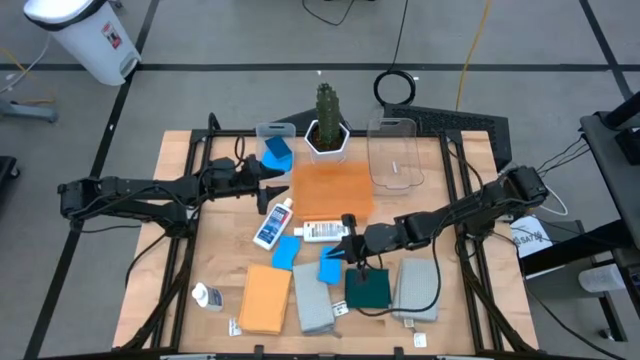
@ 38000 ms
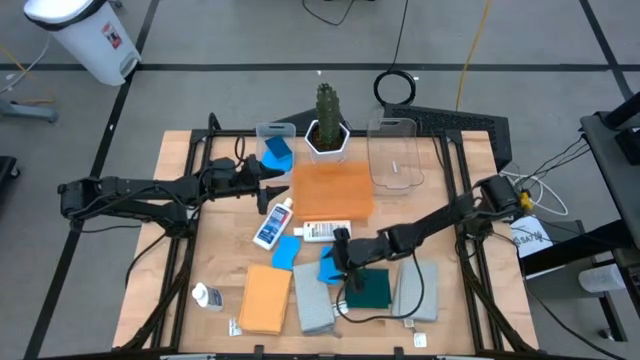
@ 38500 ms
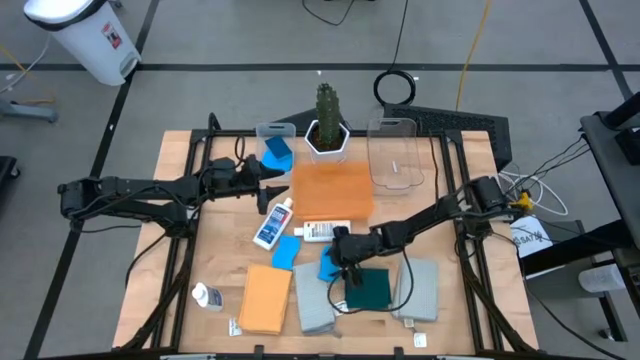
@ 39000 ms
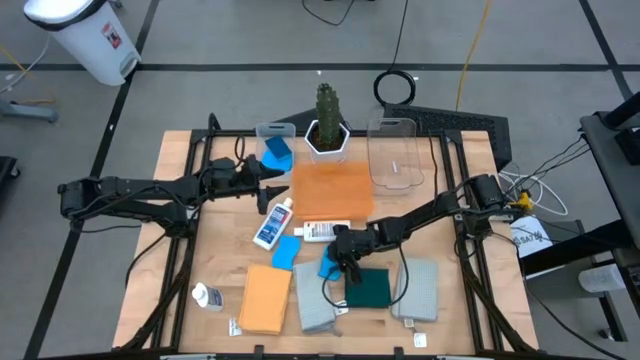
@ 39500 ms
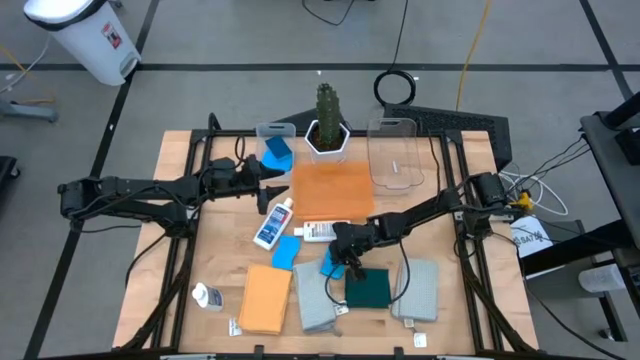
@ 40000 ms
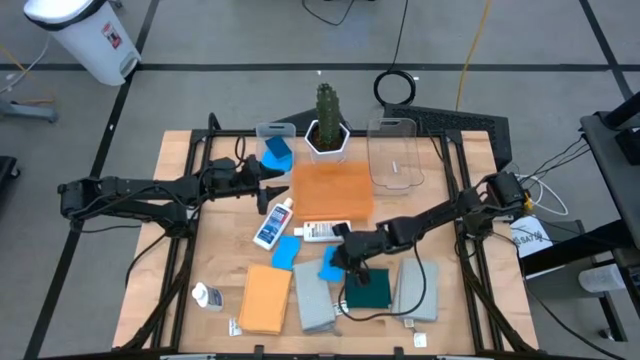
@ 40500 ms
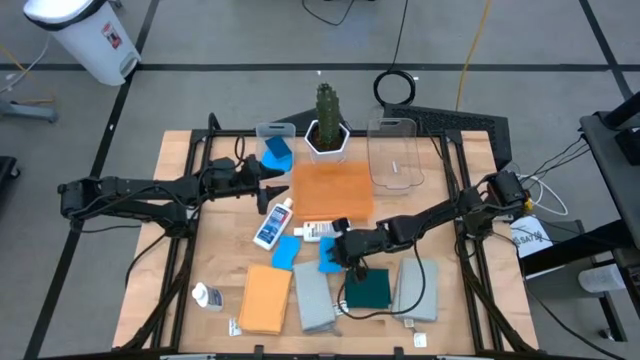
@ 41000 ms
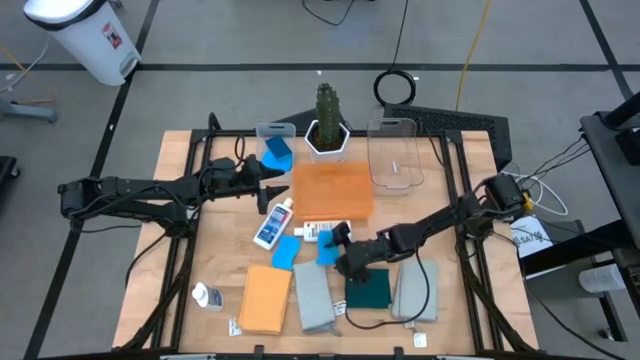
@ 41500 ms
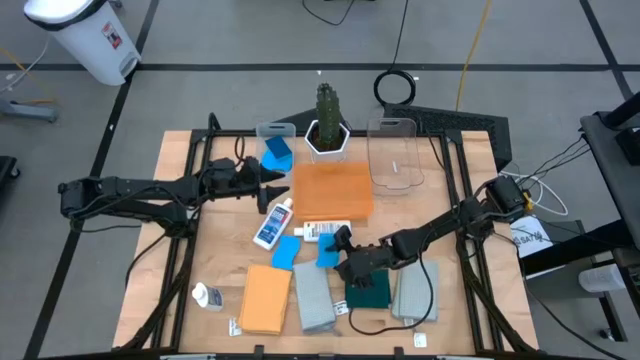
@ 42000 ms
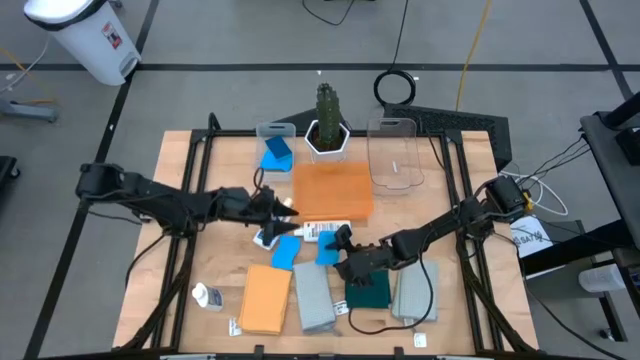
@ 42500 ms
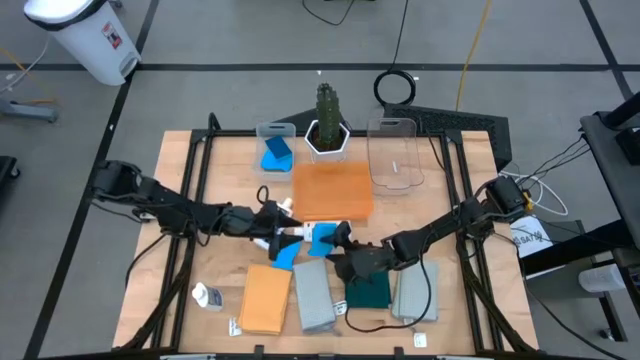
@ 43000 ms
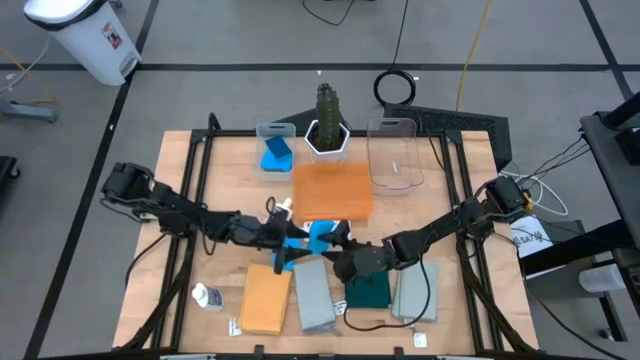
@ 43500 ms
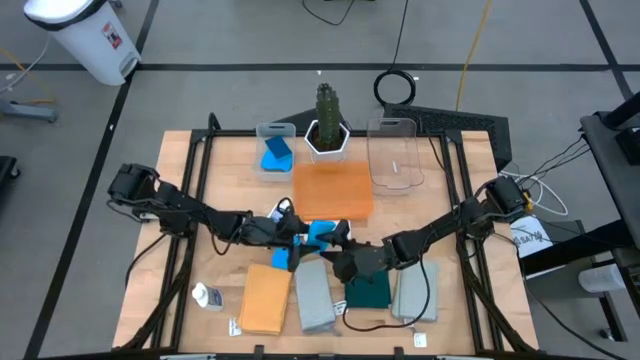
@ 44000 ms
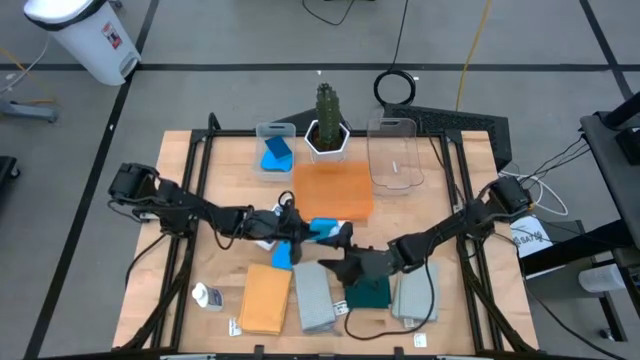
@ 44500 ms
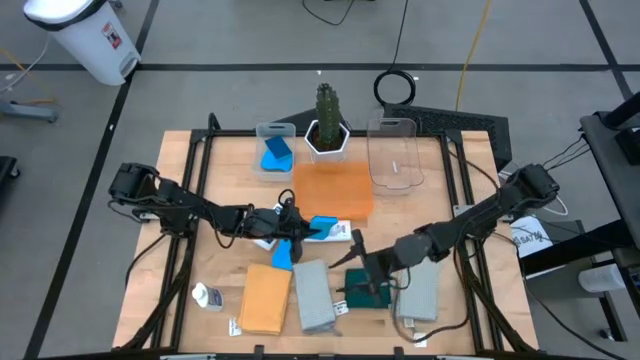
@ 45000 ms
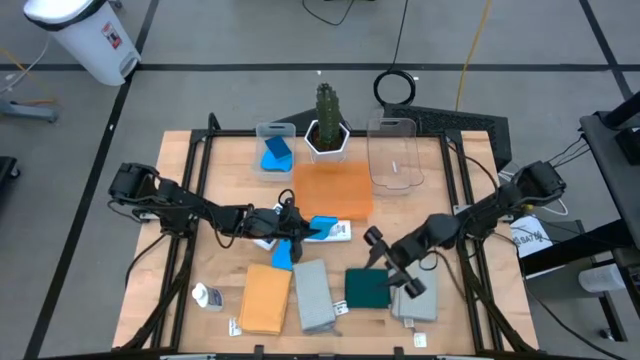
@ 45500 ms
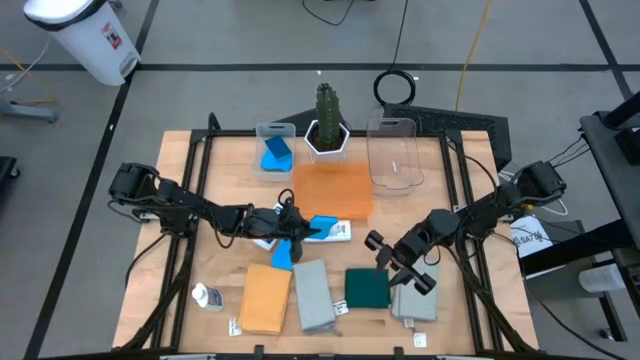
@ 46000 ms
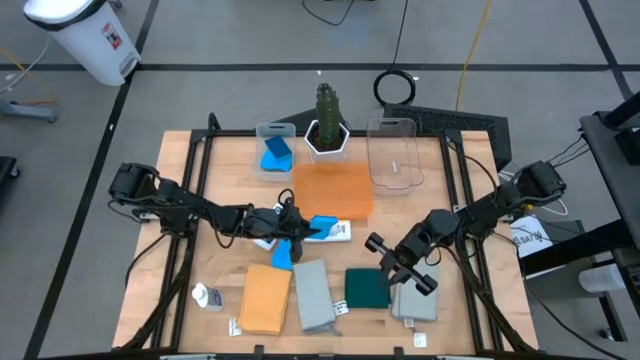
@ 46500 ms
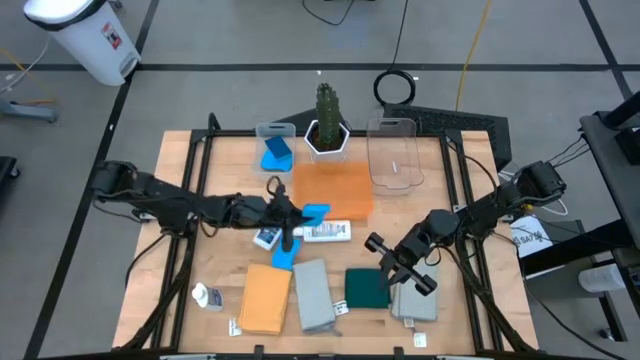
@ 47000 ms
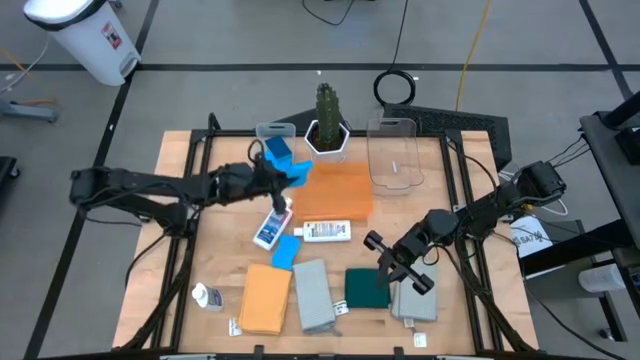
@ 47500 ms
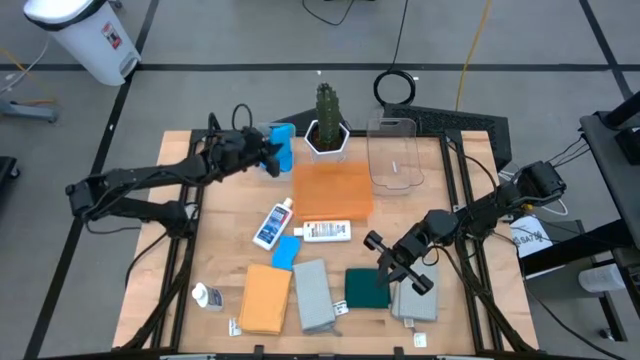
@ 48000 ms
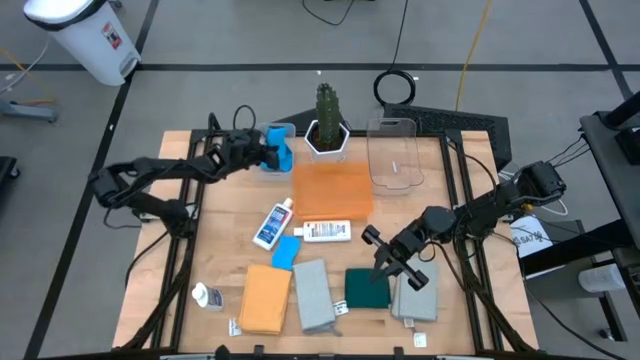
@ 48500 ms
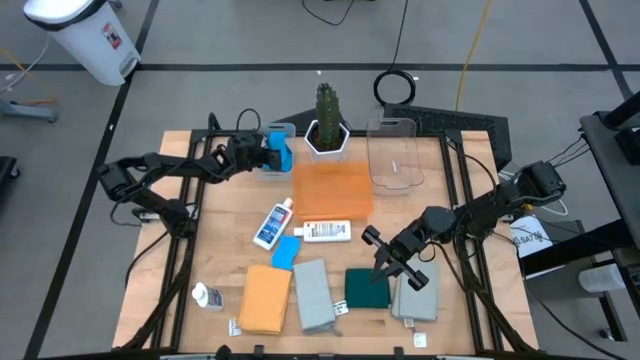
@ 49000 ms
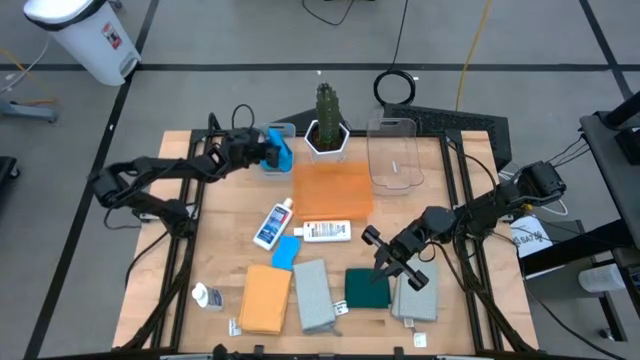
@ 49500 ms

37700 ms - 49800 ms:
Task: Pick & Place Kitchen Items
Put the blue sponge into the white bin

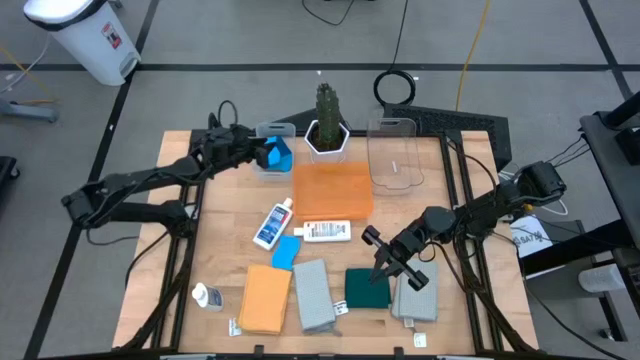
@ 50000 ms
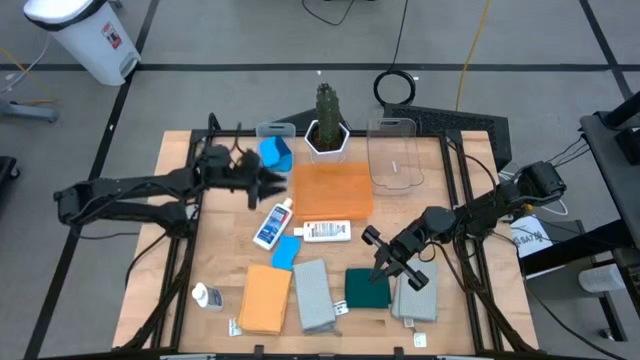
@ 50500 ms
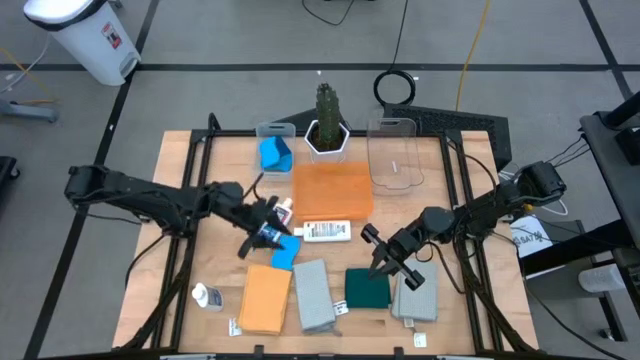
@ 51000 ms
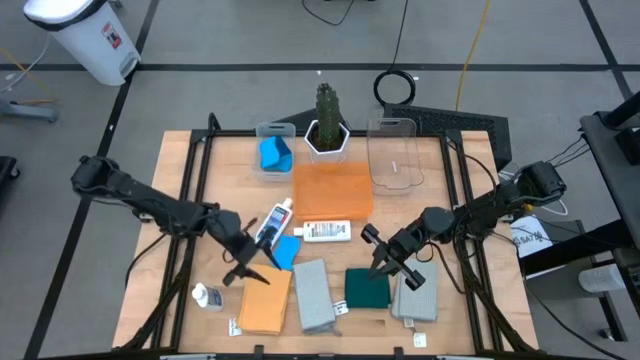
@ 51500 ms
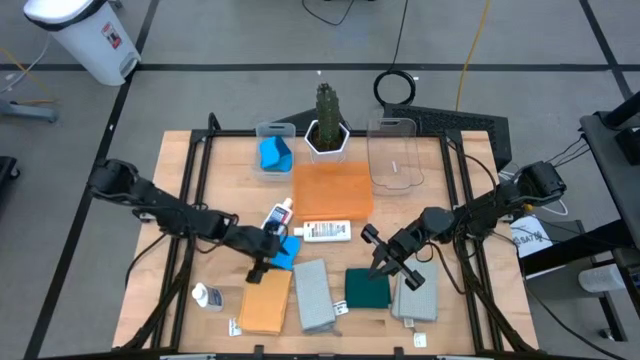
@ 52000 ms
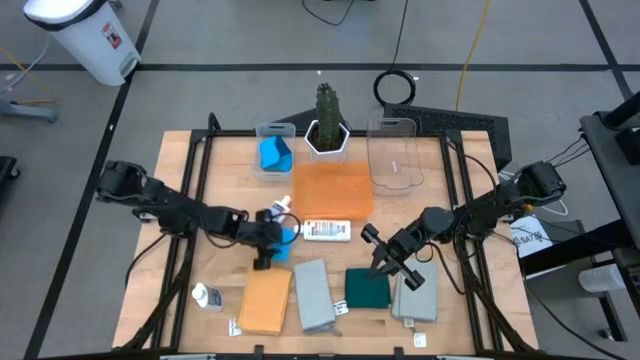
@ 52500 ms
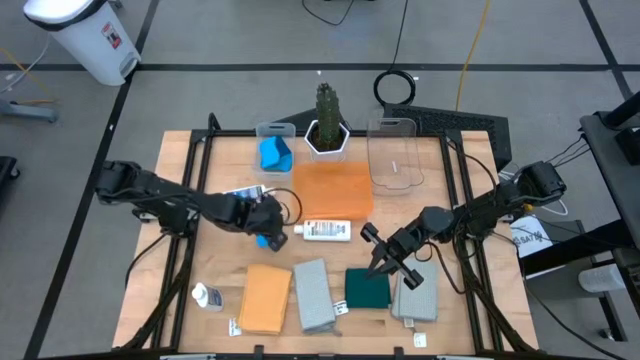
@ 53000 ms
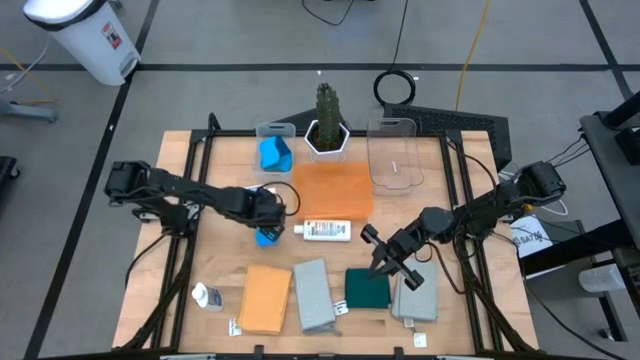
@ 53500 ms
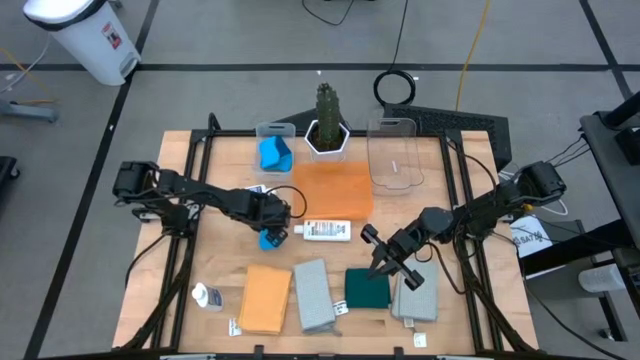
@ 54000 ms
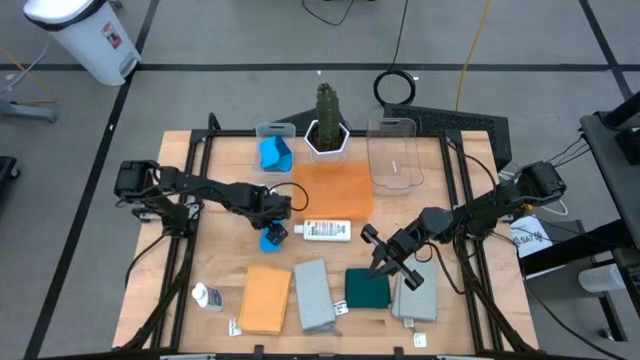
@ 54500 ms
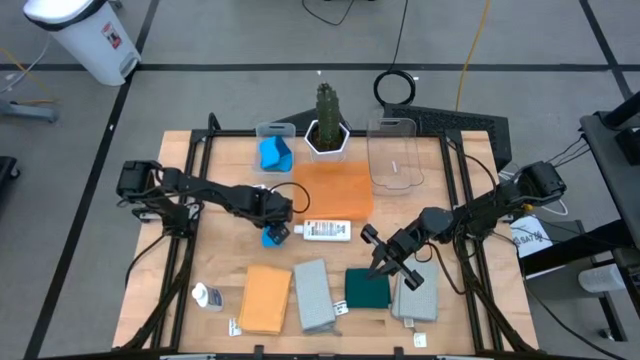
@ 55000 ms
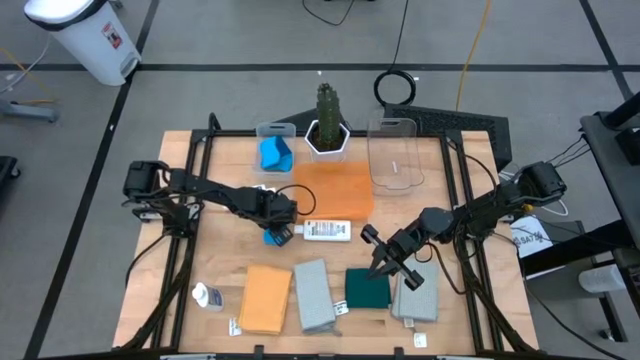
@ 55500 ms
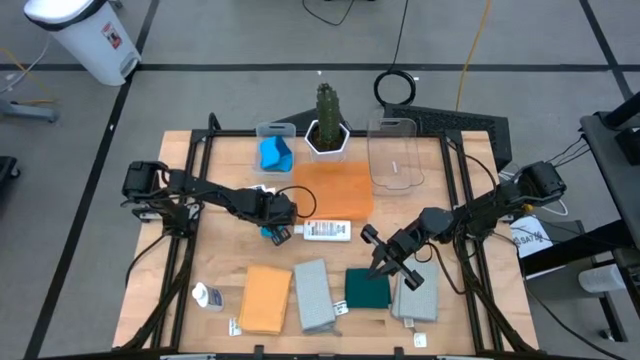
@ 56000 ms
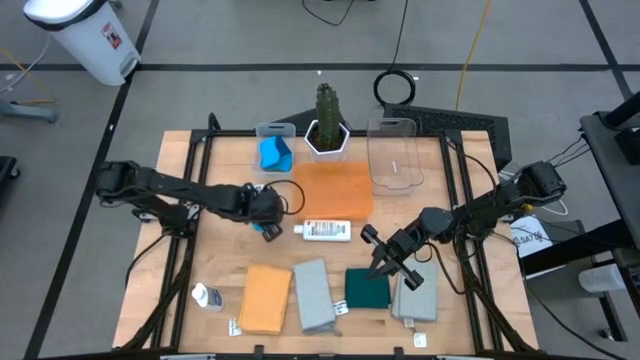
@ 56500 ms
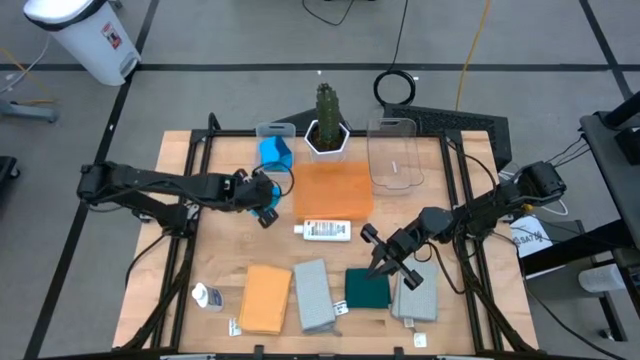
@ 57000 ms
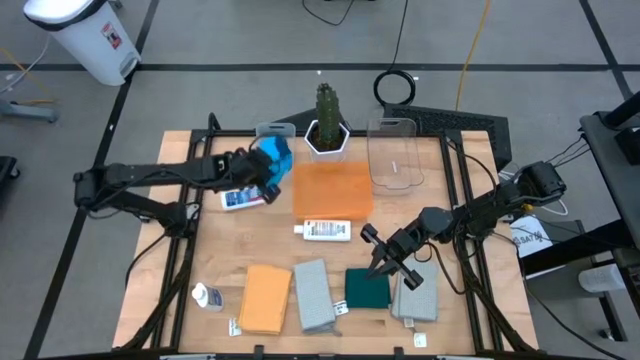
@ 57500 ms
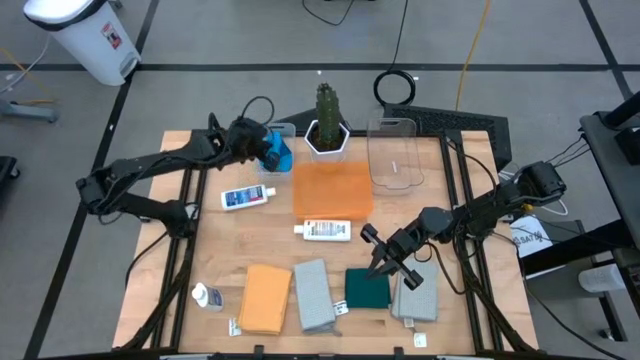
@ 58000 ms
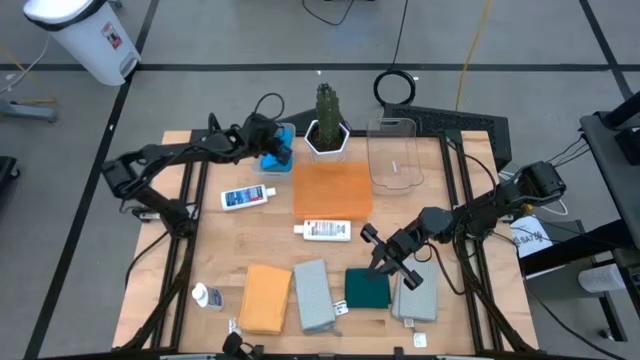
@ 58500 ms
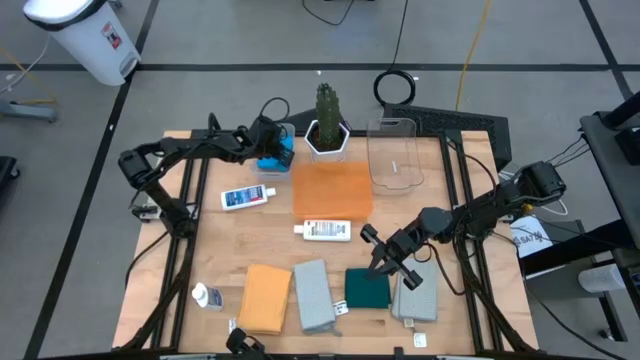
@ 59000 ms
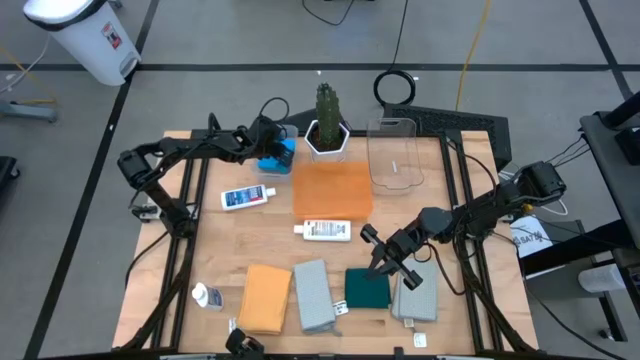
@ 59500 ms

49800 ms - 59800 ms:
Put the blue sponge into the white bin
